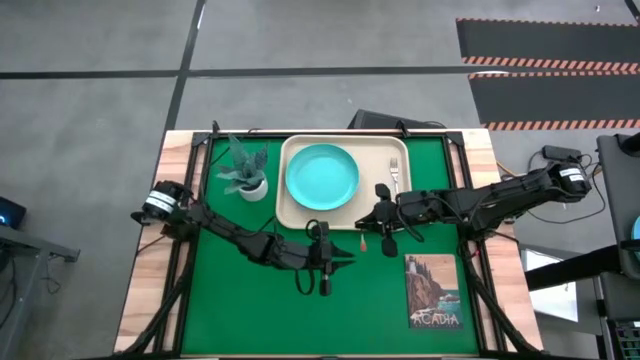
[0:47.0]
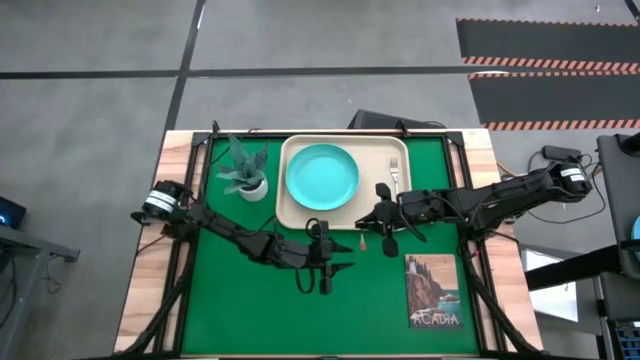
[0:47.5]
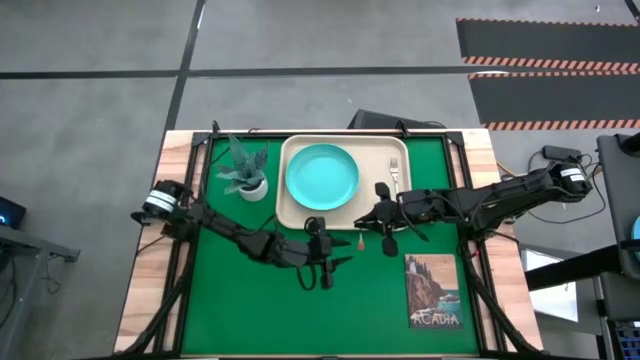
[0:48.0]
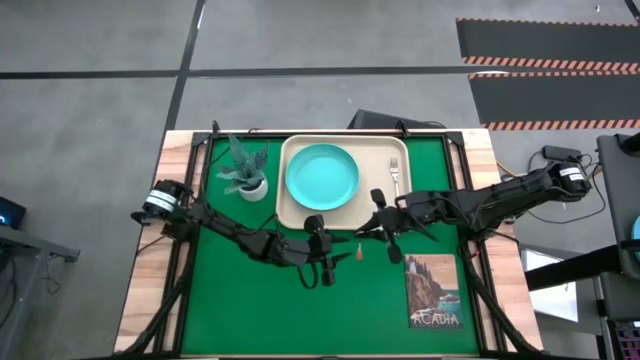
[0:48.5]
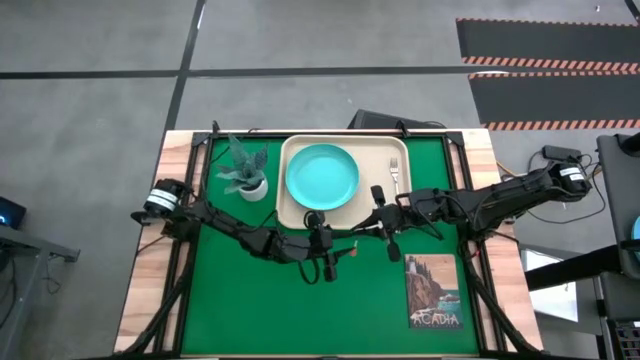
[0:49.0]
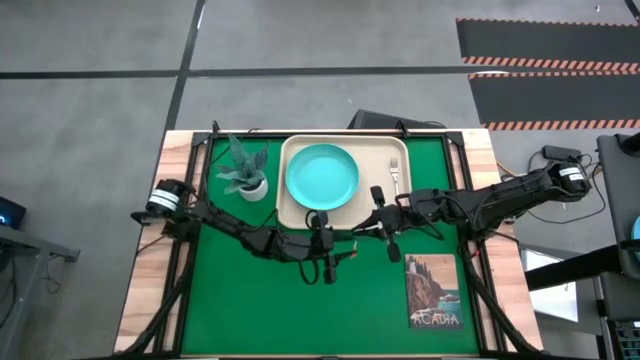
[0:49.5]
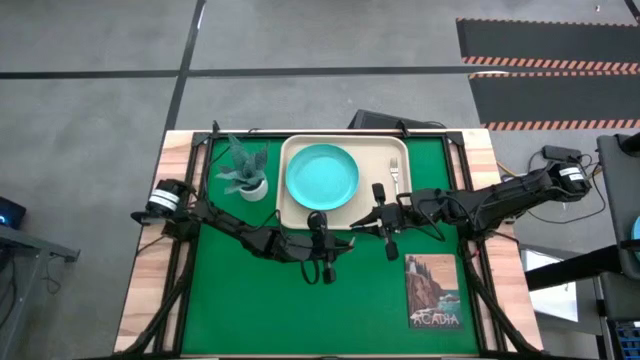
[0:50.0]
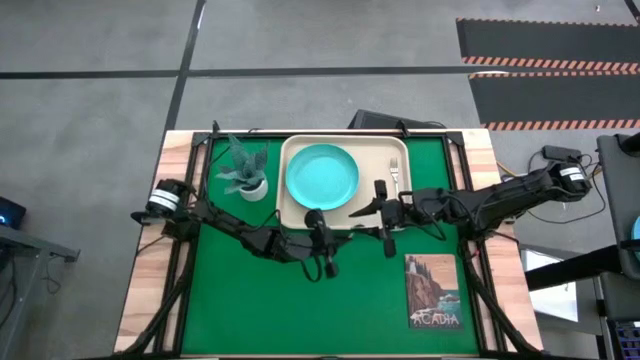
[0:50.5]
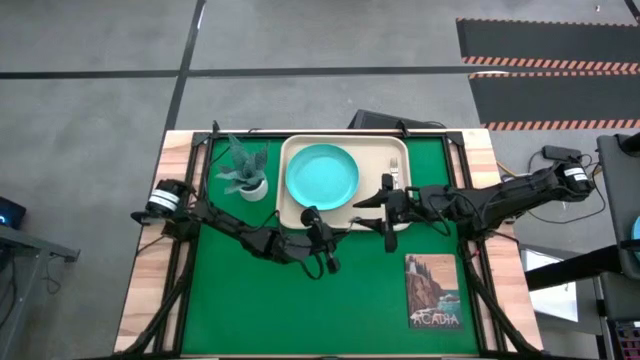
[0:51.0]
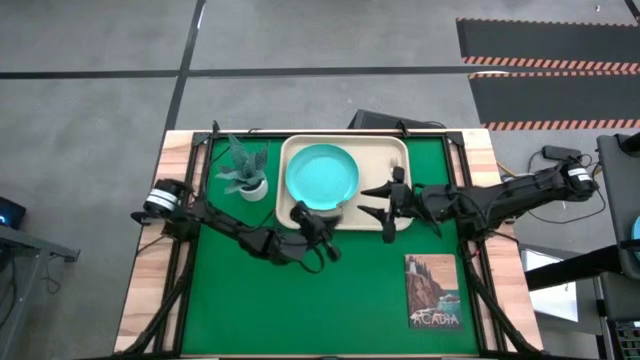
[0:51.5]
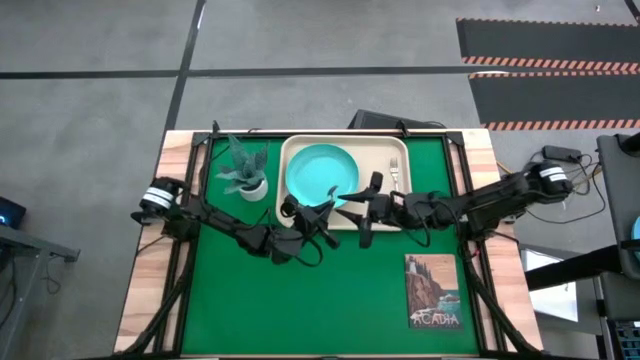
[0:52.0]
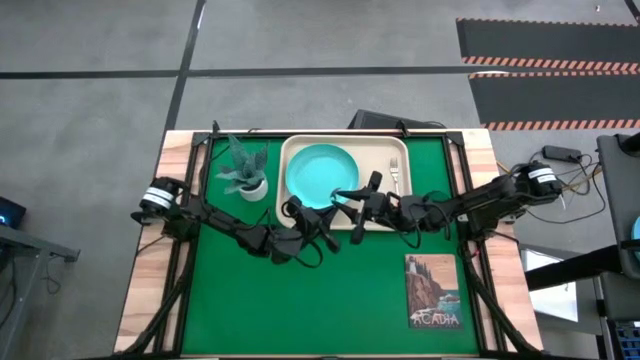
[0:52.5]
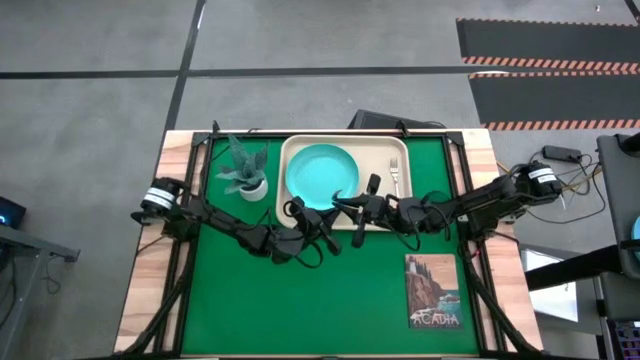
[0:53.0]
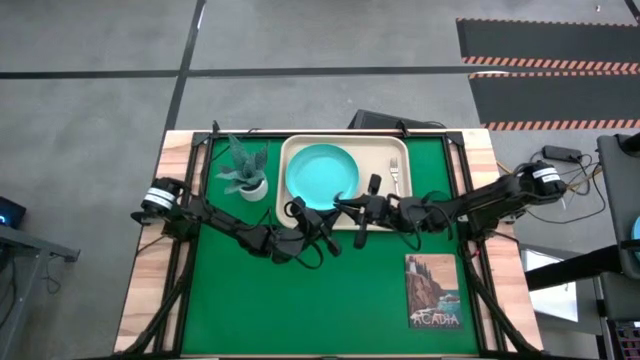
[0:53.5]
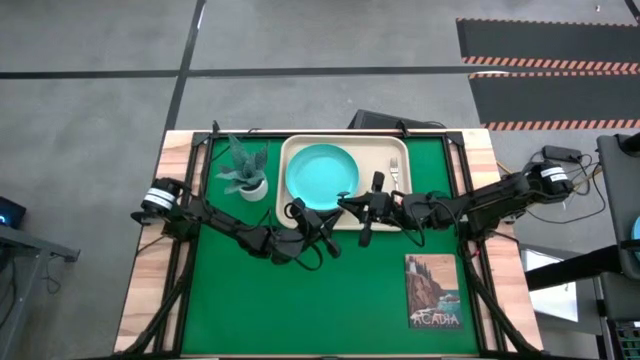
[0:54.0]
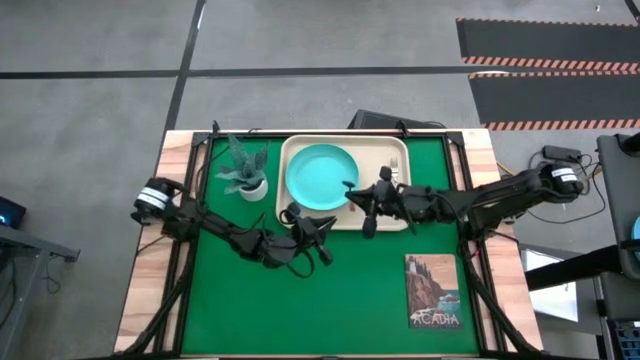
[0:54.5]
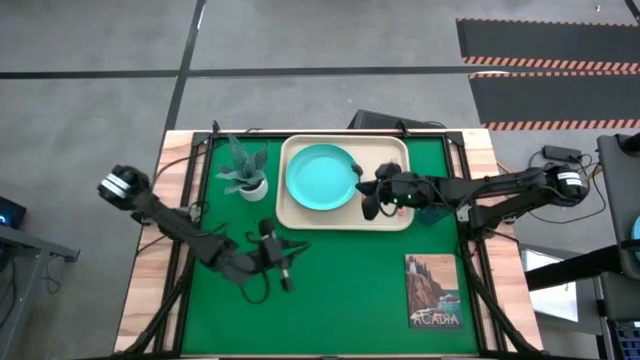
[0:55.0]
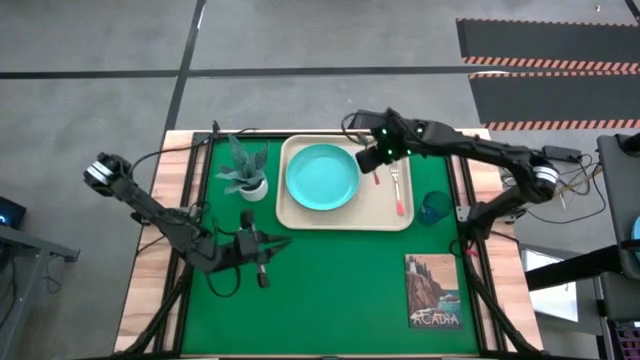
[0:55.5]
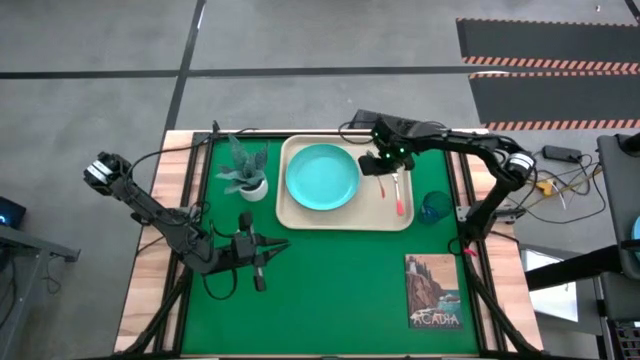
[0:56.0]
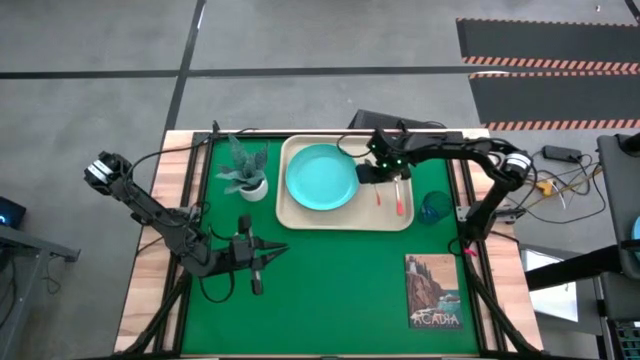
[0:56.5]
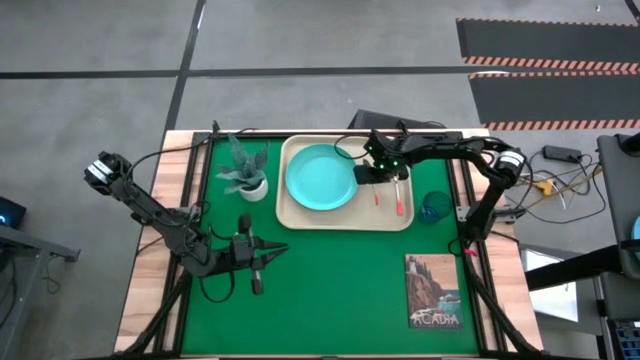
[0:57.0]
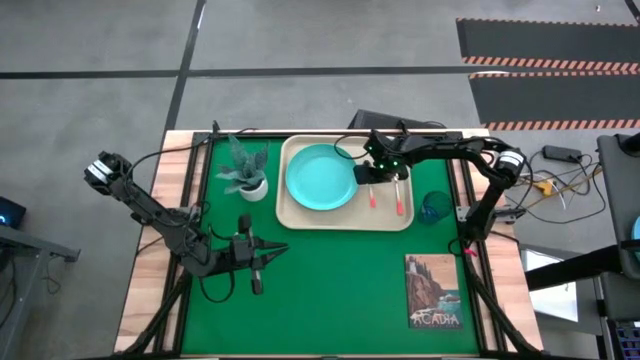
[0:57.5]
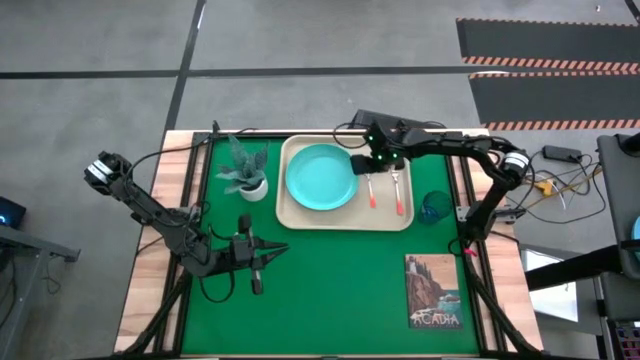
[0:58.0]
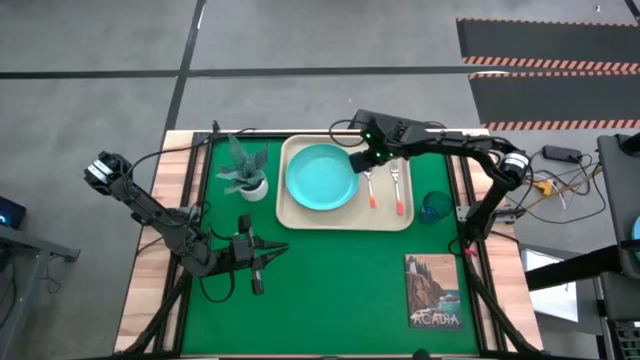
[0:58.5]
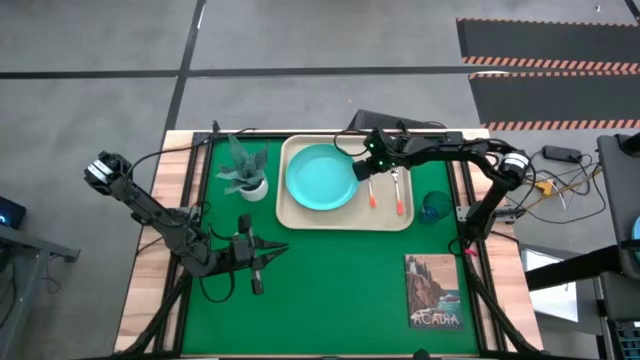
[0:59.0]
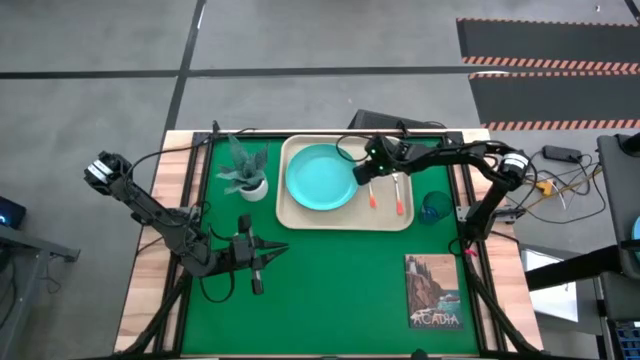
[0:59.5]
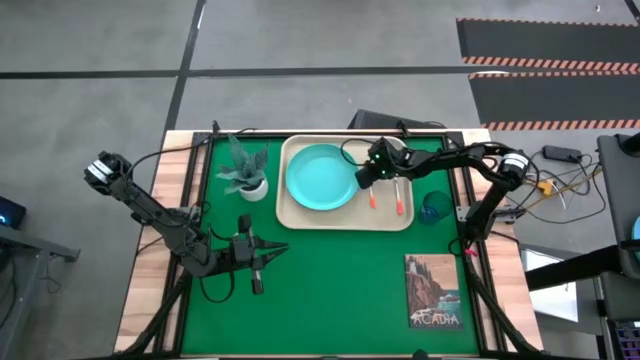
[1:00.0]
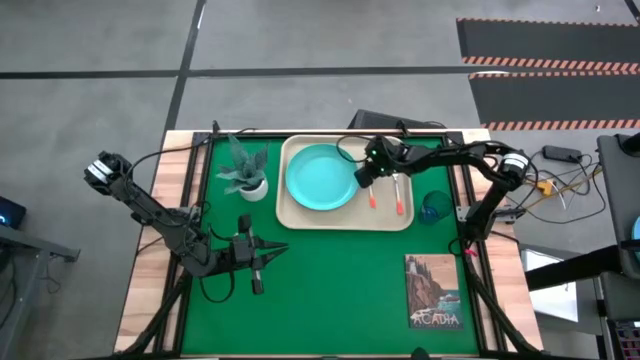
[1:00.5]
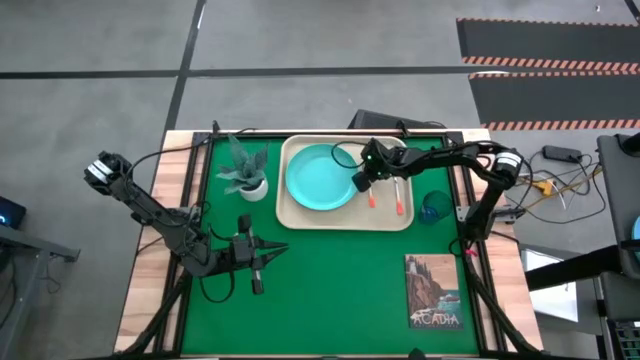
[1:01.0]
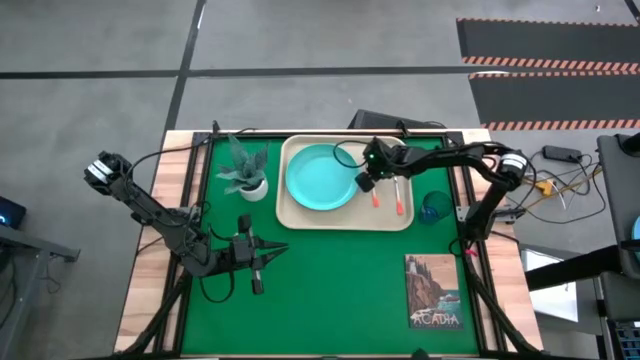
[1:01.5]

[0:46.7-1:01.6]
Task: Pick and place plate/cup/fork/spoon on tray
Put the orange spoon on the light white tray to the left of the orange fork

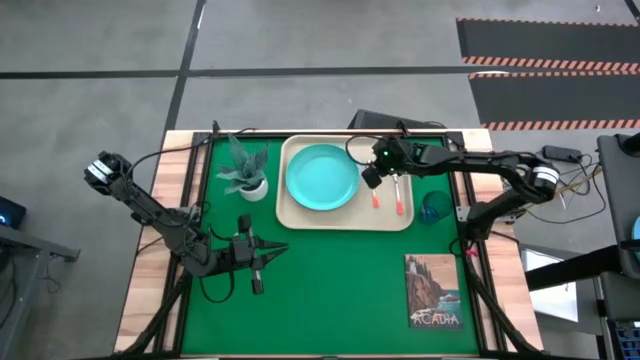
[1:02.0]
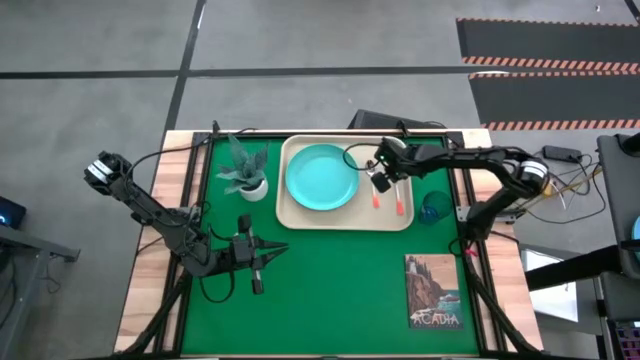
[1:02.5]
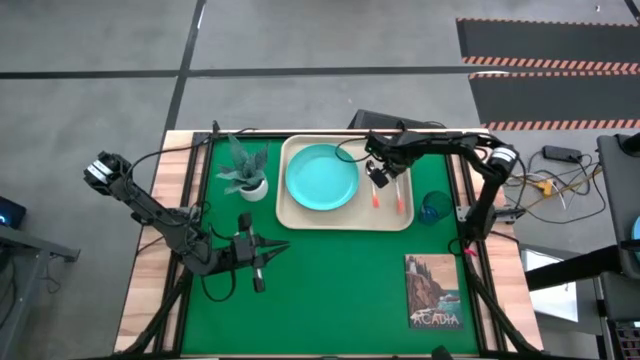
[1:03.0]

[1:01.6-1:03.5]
Adjust the orange fork on the light white tray

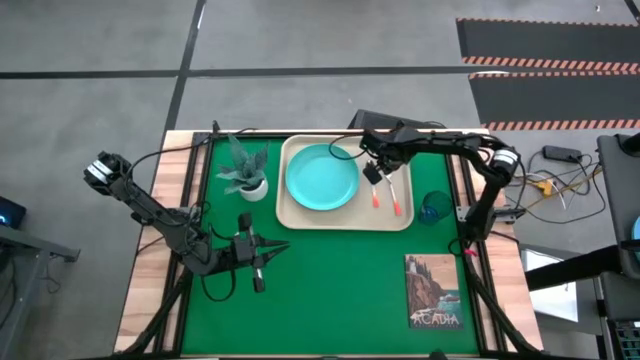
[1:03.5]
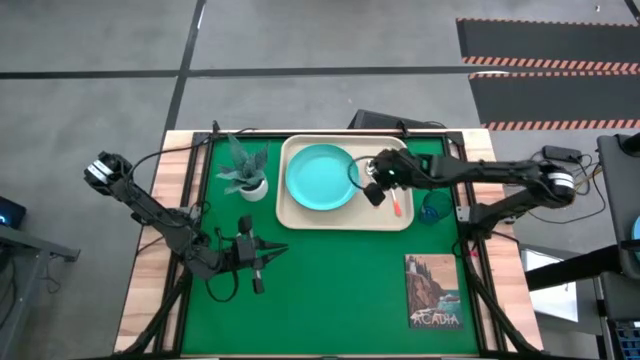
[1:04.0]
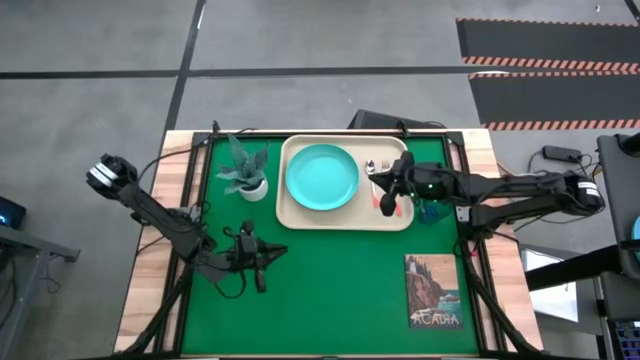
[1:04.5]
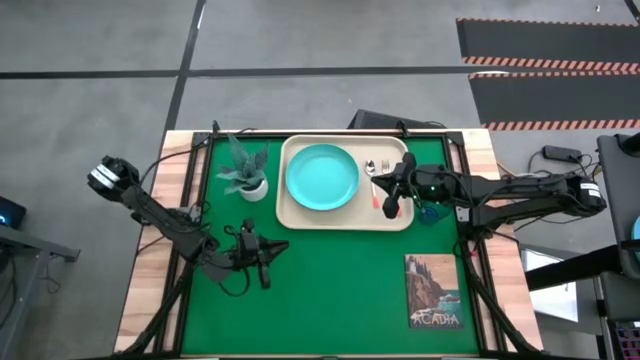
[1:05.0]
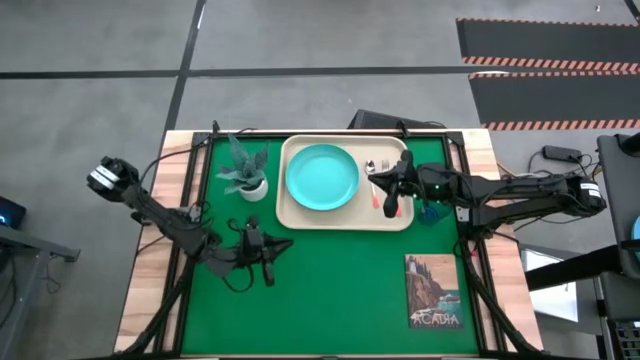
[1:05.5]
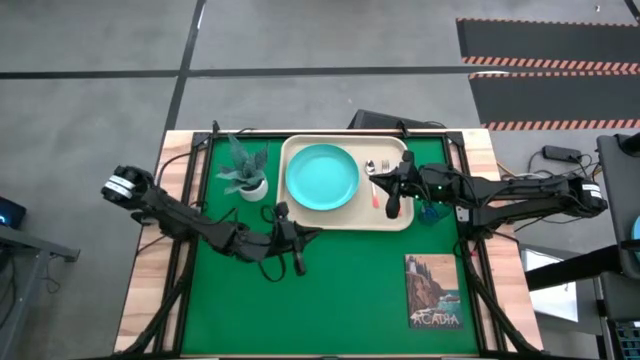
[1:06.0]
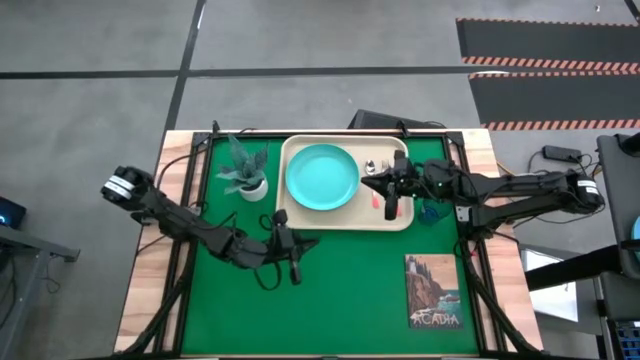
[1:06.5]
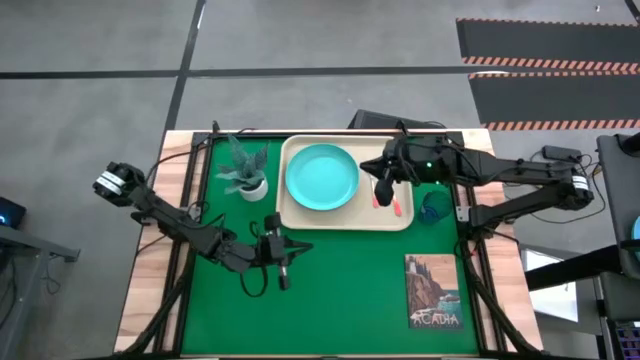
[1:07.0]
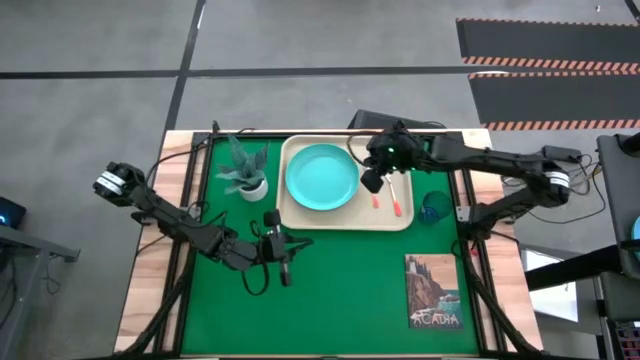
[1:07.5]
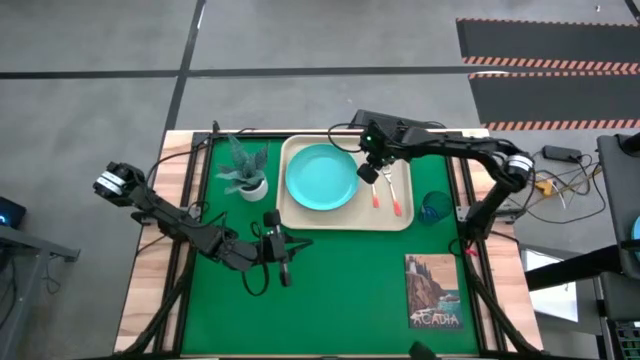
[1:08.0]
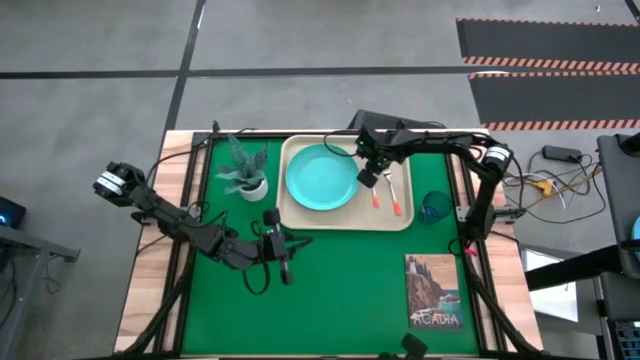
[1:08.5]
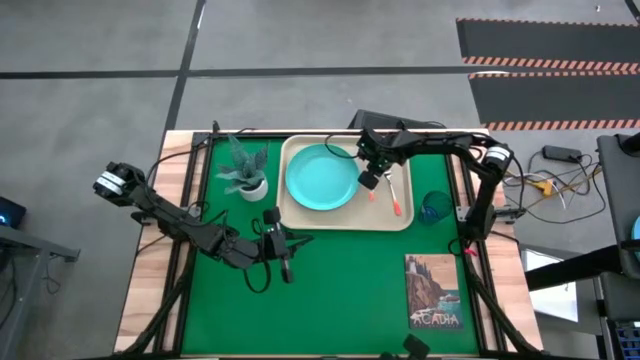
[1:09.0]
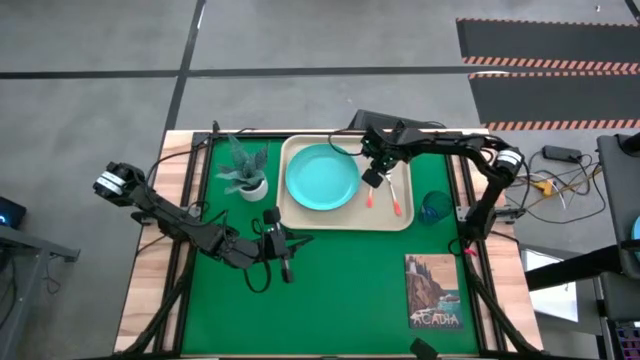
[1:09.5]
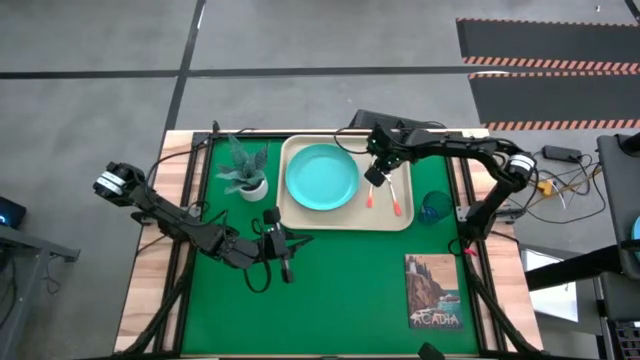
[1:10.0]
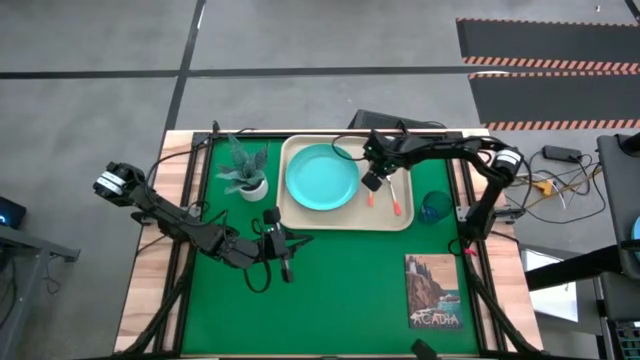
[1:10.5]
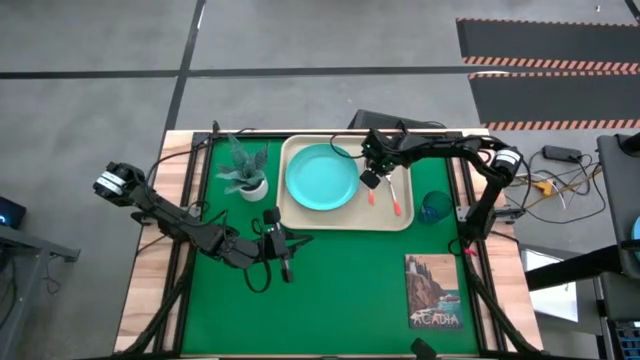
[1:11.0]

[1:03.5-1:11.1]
Adjust the orange spoon on the light white tray
